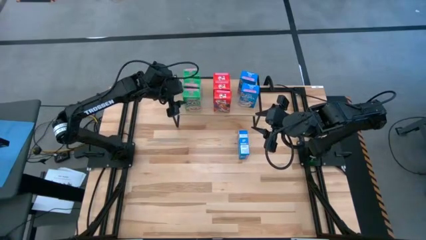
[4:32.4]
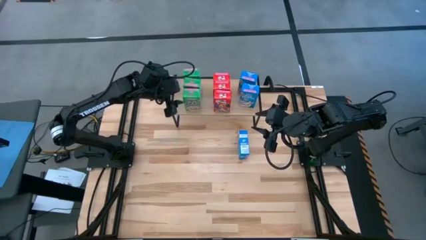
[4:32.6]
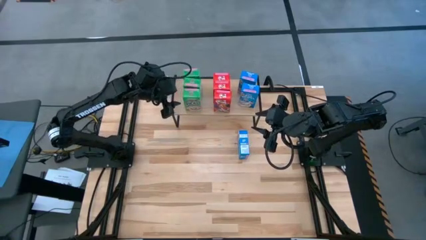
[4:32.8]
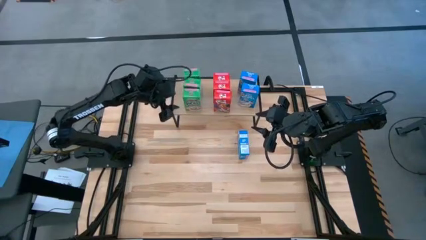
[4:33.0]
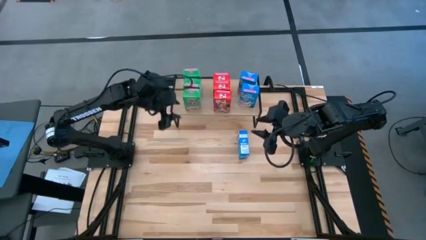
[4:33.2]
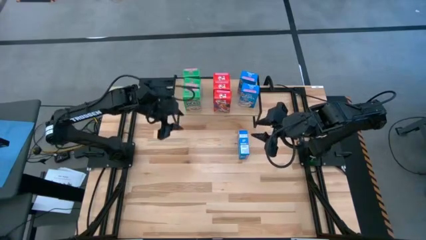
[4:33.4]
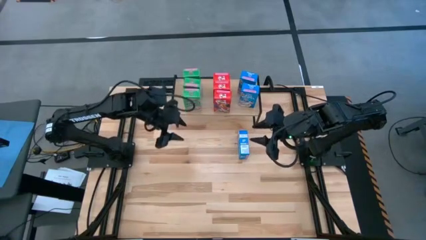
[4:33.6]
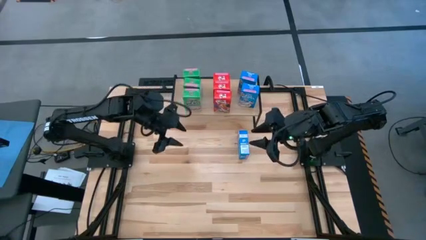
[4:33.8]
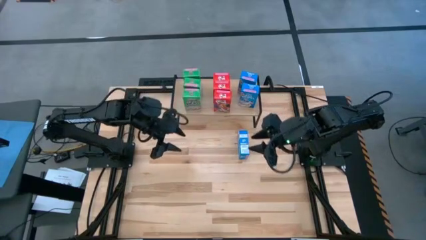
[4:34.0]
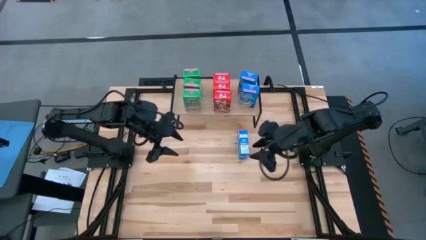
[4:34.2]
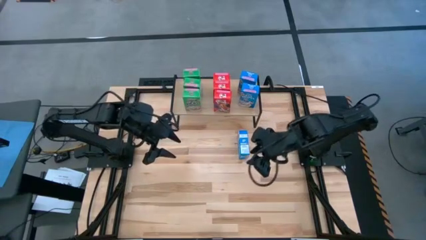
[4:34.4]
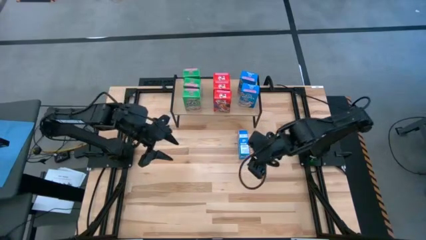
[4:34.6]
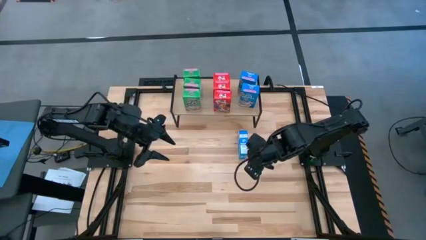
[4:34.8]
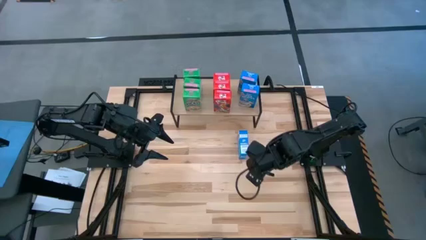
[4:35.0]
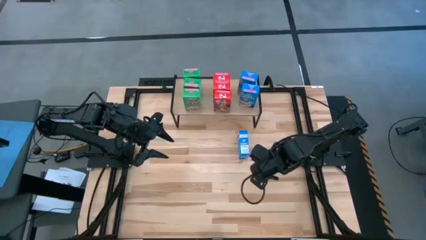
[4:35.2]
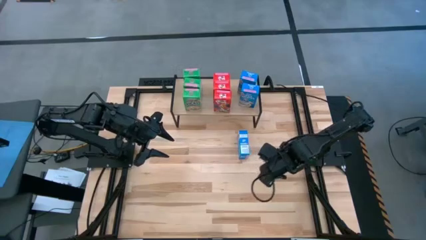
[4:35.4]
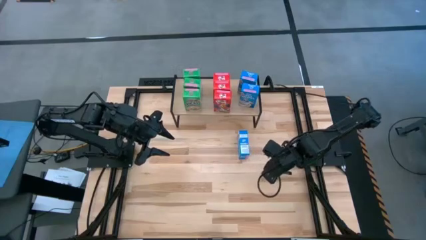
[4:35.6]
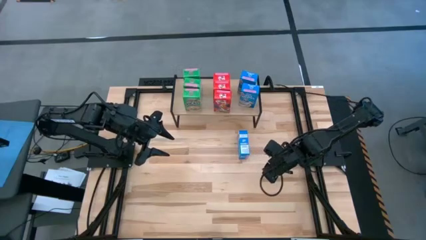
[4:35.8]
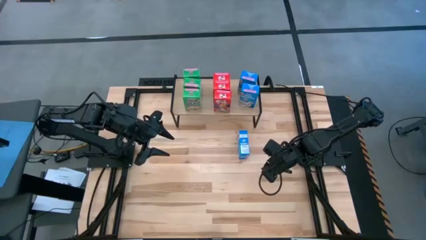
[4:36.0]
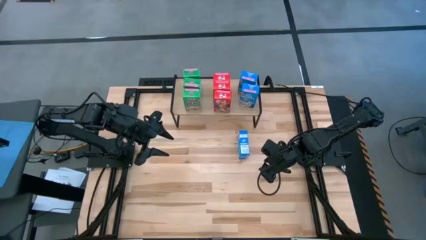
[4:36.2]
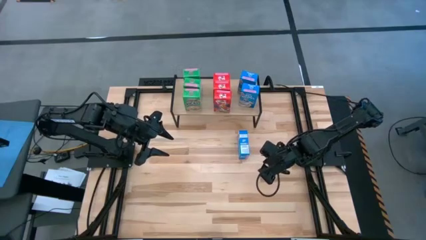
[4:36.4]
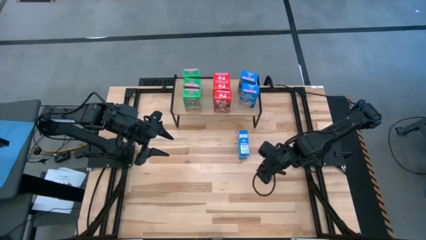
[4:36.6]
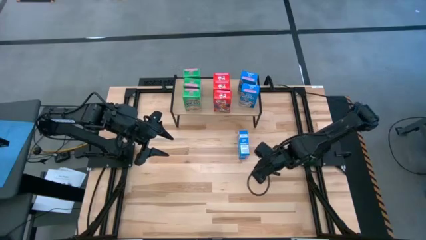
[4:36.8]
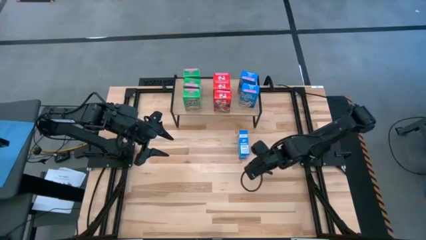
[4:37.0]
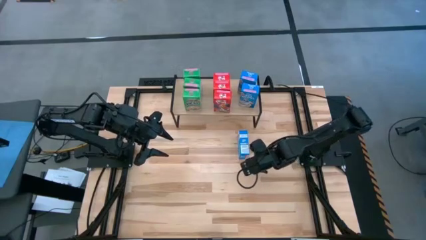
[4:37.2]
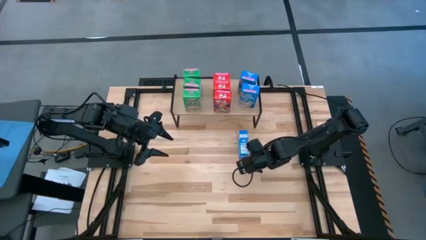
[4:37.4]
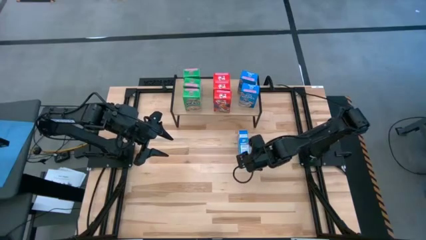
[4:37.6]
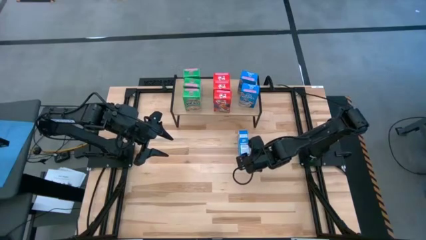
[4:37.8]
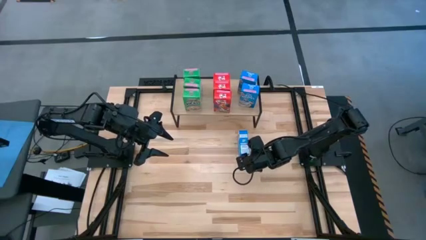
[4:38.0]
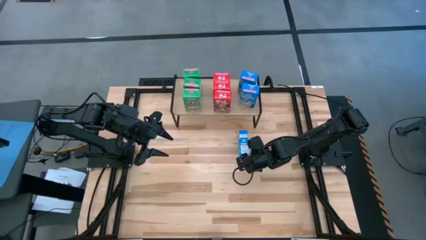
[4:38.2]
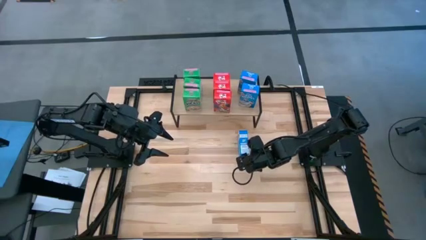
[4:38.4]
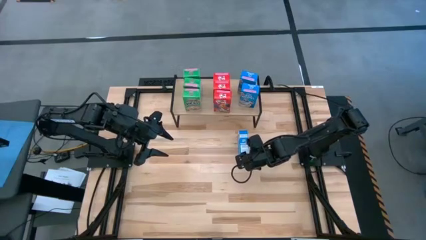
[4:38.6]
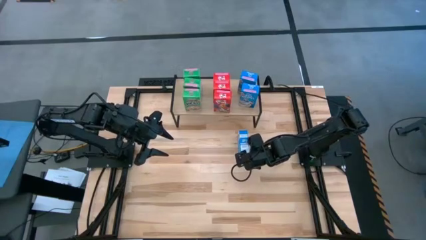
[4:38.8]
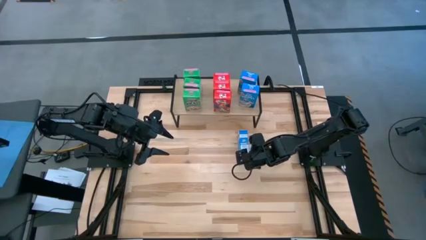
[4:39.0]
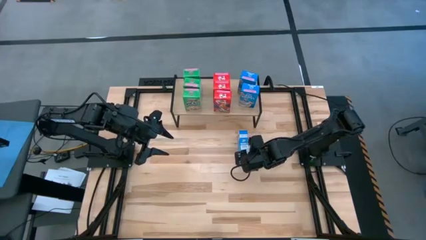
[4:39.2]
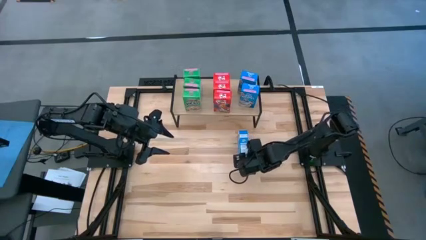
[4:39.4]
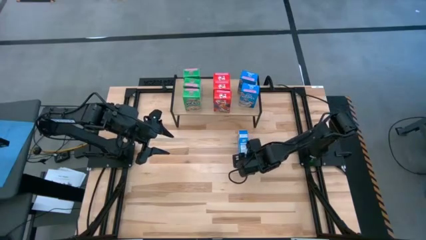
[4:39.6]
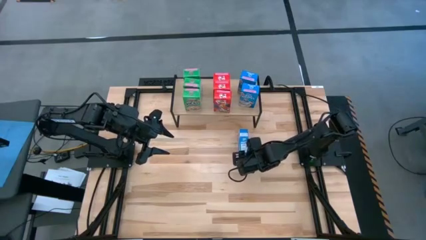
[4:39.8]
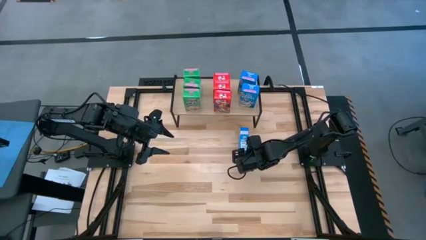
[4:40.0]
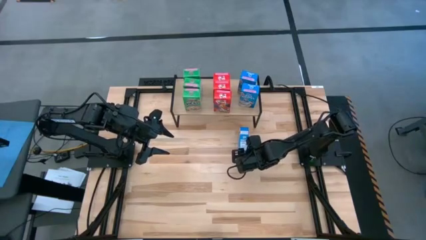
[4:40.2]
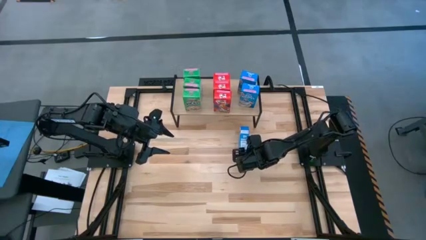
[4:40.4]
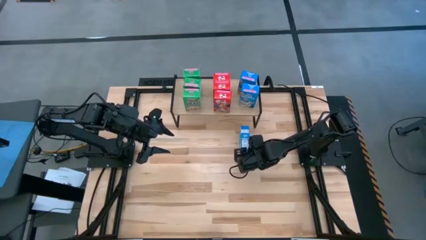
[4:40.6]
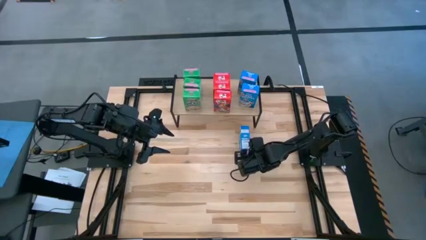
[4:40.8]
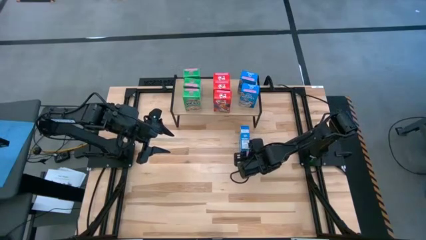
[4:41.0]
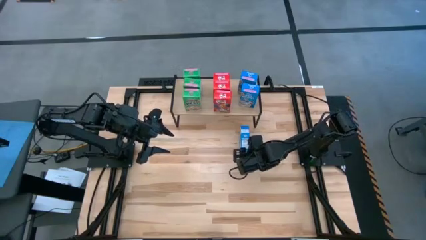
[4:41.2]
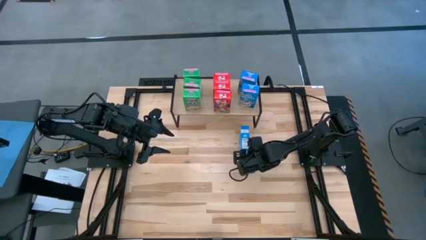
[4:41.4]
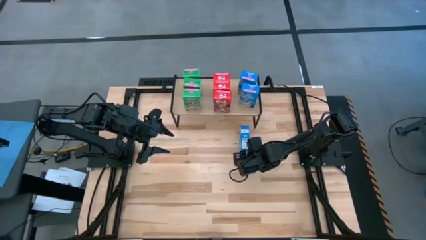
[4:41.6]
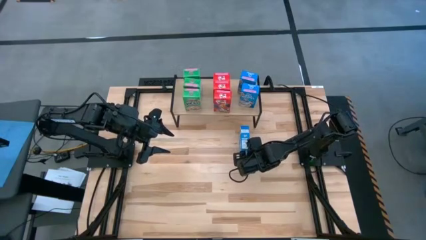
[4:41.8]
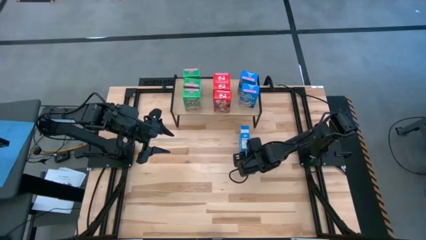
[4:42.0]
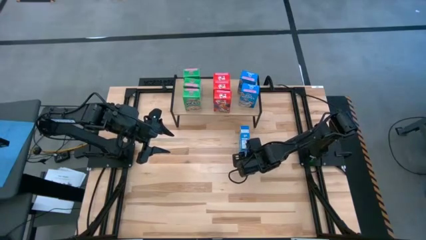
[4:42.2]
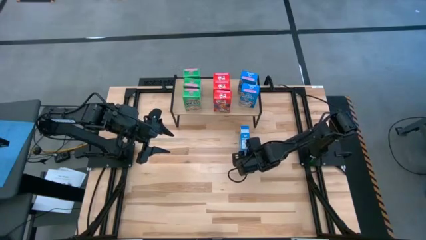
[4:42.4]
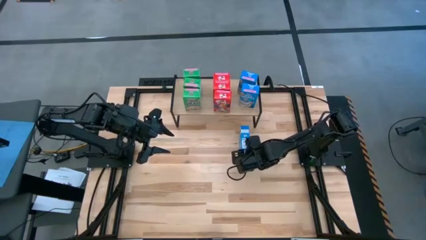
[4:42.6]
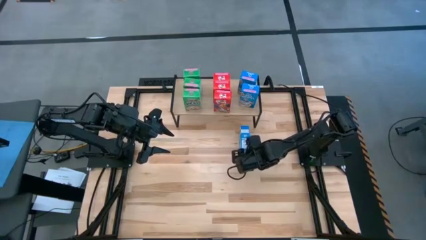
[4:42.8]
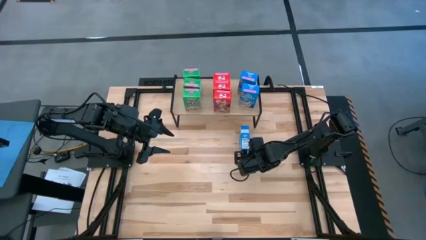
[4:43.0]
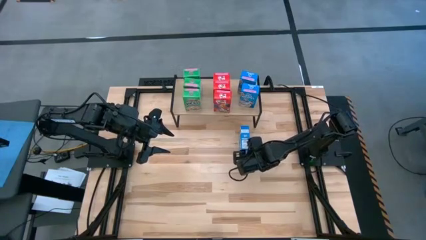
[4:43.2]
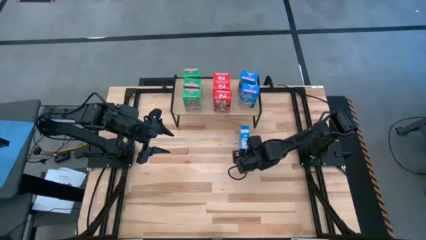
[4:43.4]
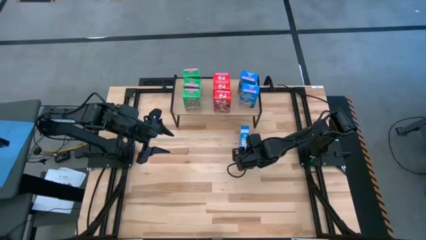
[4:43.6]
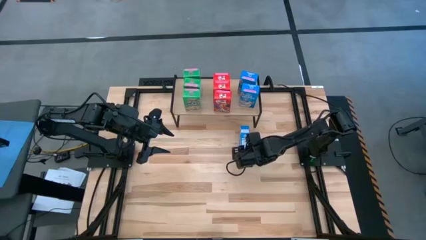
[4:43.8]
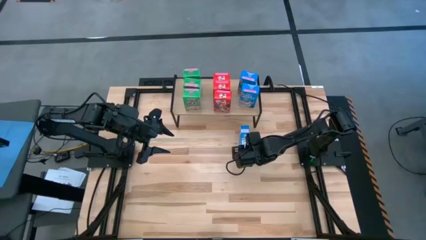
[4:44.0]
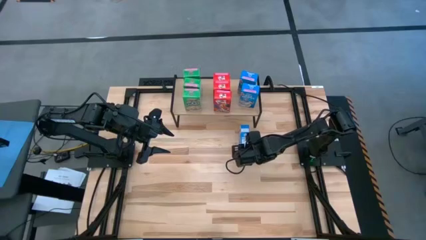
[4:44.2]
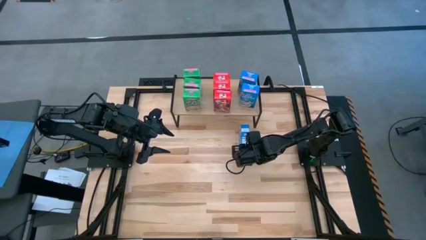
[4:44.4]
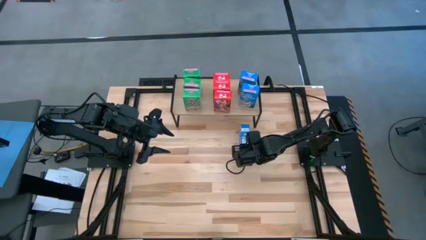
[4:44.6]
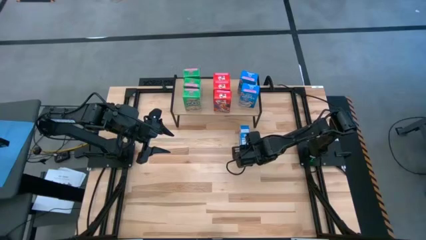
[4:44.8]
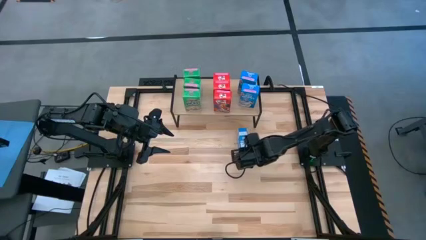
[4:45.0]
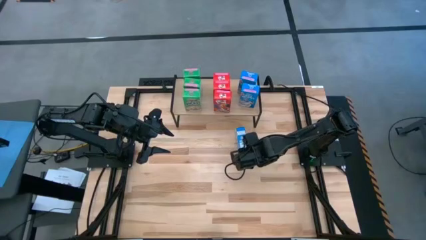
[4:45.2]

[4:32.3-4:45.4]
Task: Stack cereal on shelf
Put the blue cereal box on the shelf aligned with the other blue cereal boxes

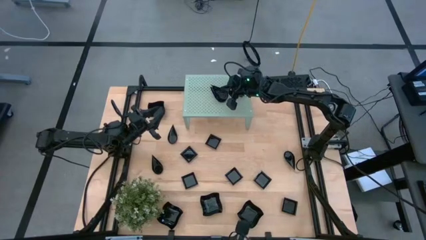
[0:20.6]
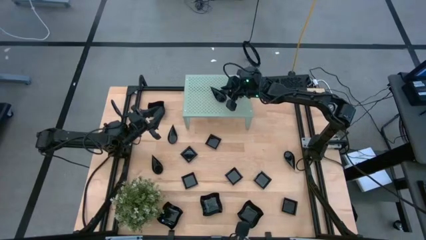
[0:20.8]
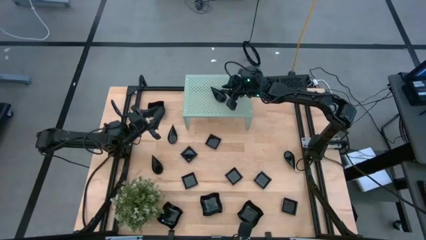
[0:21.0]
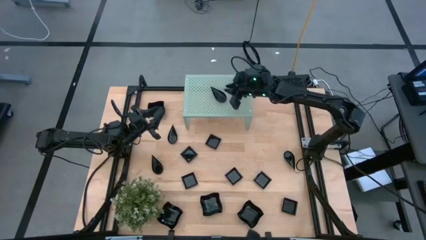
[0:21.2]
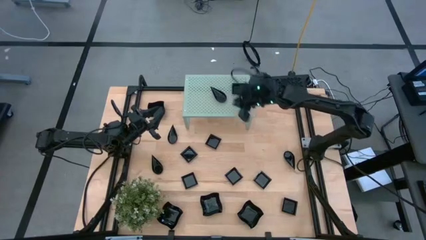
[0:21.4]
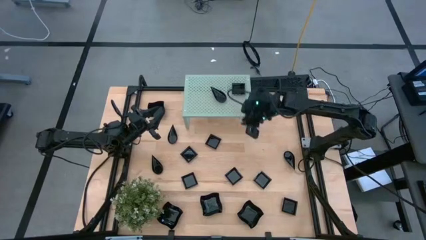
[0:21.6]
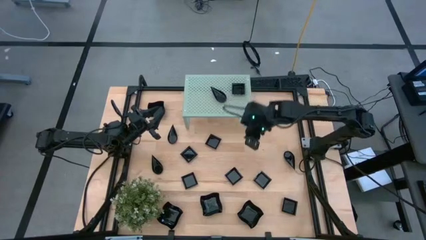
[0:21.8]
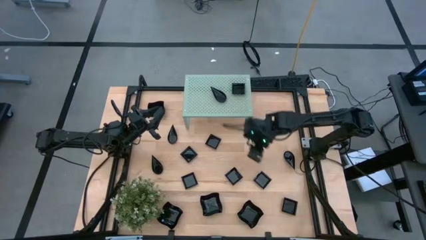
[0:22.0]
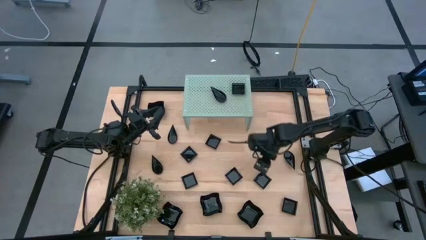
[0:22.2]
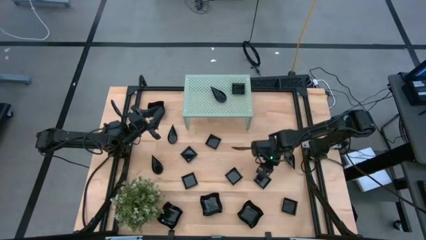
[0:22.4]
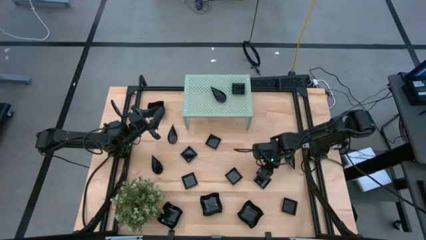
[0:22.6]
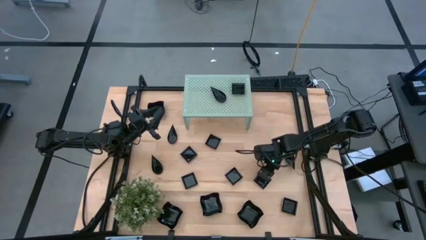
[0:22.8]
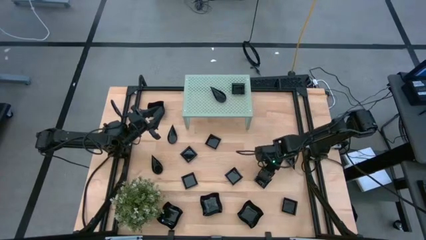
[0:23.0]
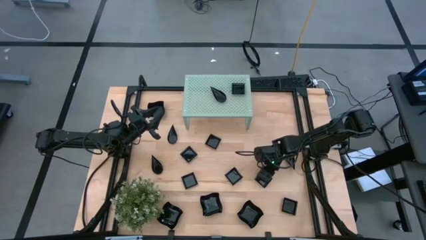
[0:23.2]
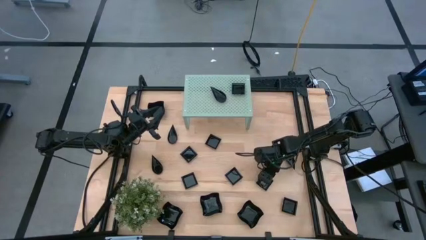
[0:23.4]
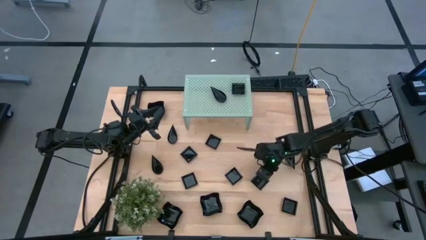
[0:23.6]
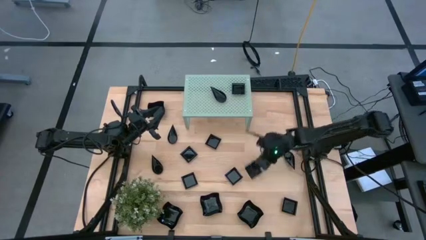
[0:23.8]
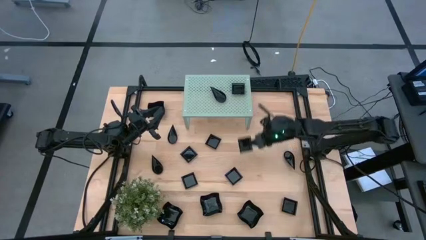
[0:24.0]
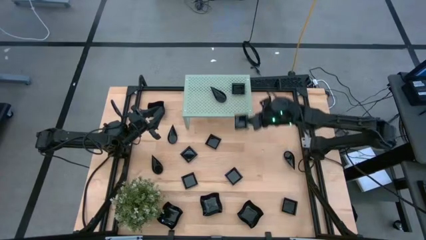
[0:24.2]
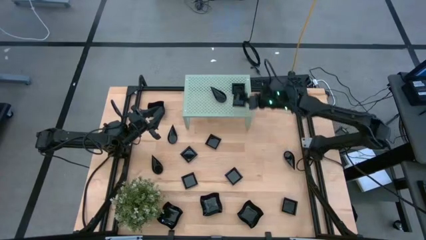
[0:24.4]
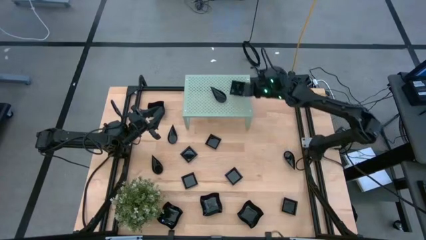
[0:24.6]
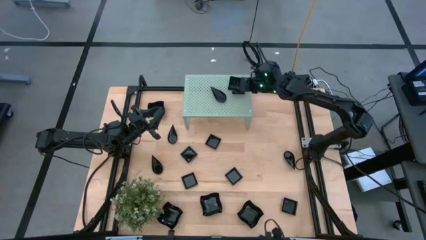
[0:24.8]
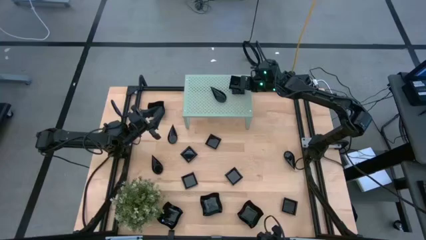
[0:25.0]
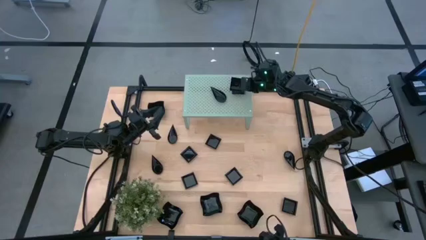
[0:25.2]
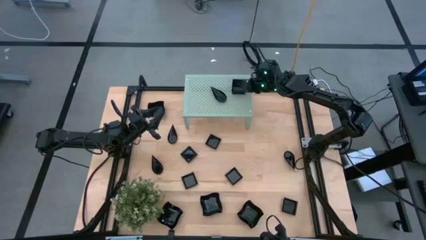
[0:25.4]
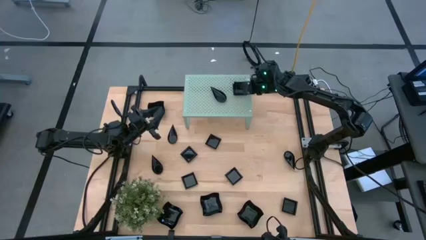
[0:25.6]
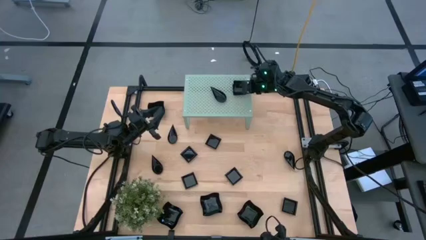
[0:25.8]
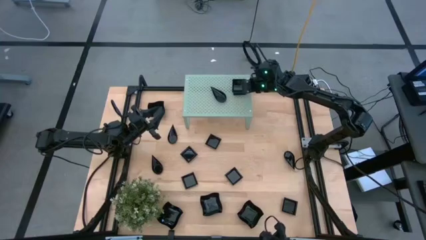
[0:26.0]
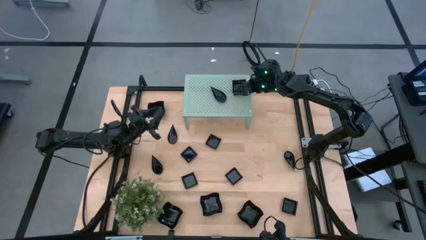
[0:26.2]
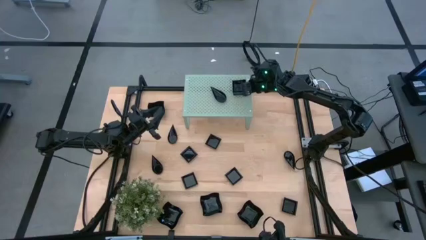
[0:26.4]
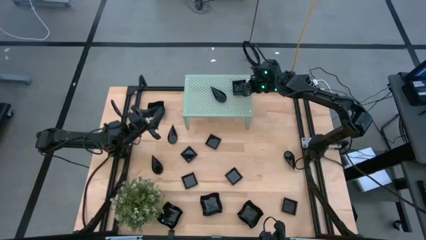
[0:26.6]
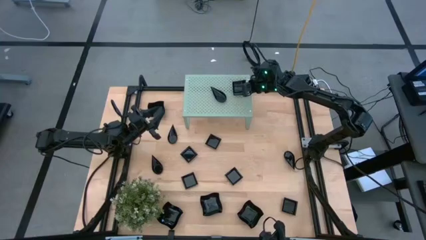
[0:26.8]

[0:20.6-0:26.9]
Task: Pick & Place Mini shaped plates
Stack the black square plate on the shelf
